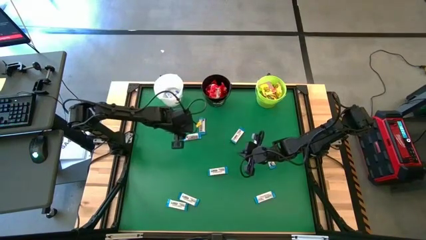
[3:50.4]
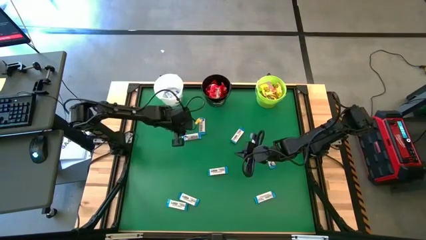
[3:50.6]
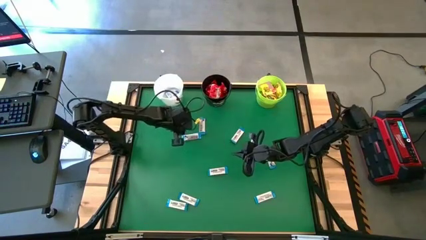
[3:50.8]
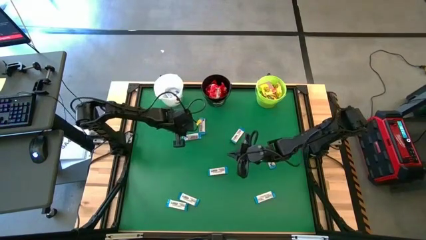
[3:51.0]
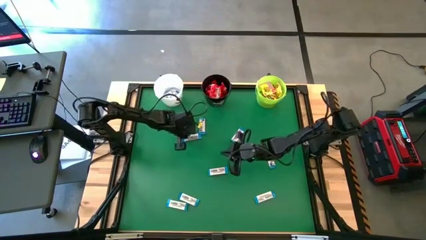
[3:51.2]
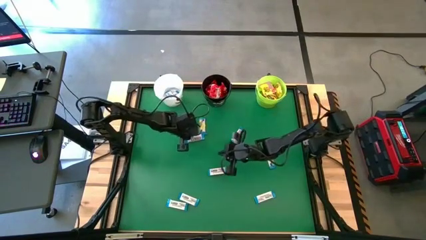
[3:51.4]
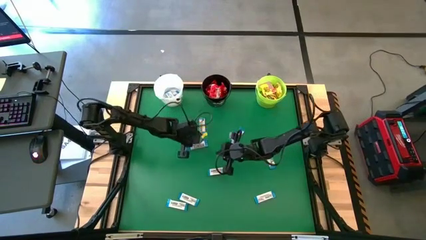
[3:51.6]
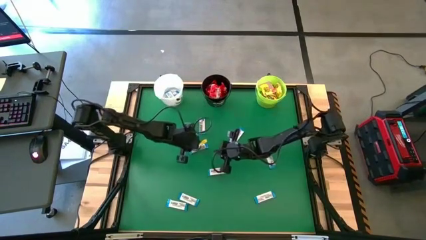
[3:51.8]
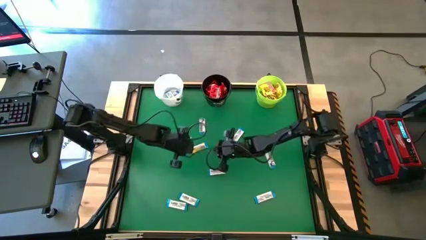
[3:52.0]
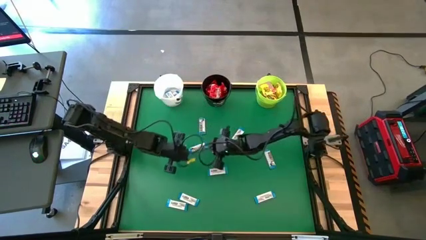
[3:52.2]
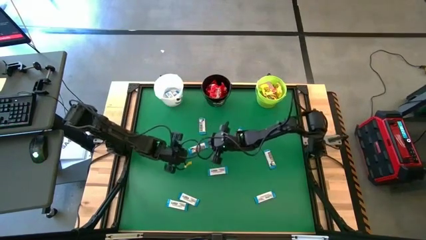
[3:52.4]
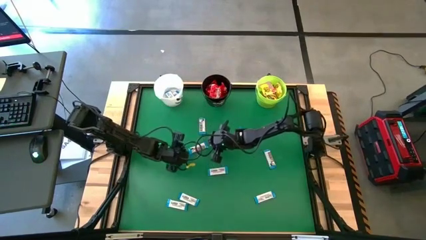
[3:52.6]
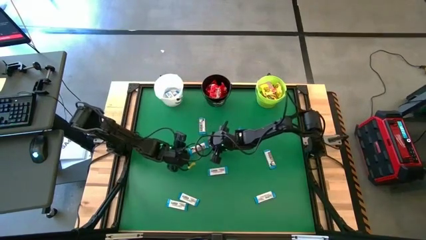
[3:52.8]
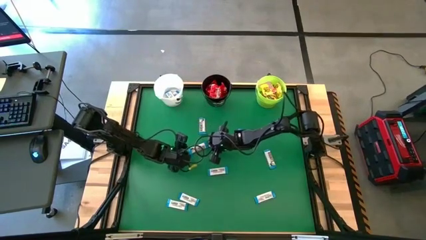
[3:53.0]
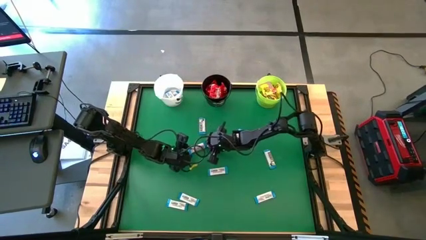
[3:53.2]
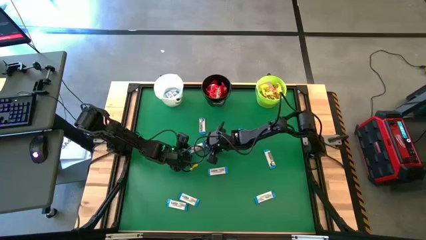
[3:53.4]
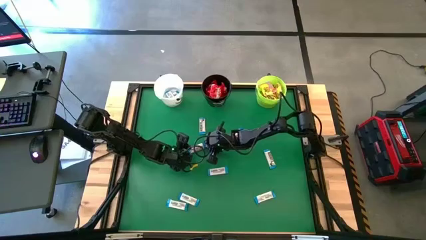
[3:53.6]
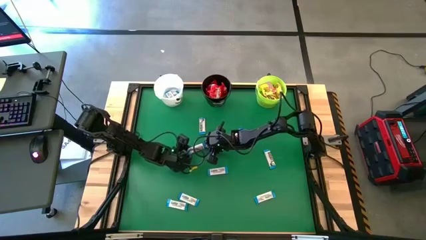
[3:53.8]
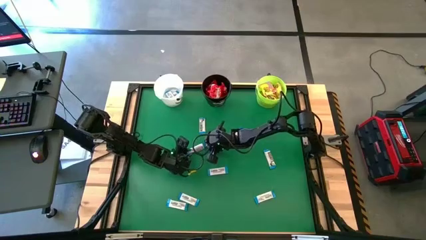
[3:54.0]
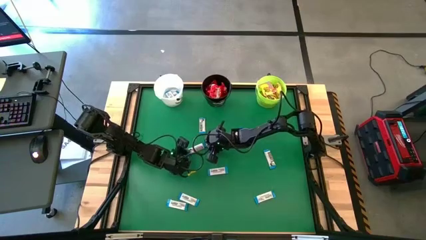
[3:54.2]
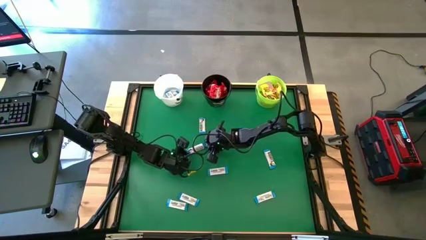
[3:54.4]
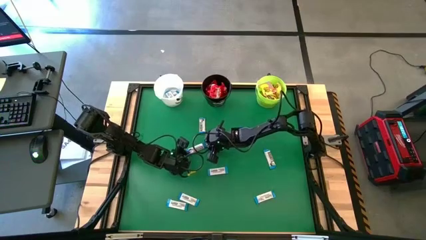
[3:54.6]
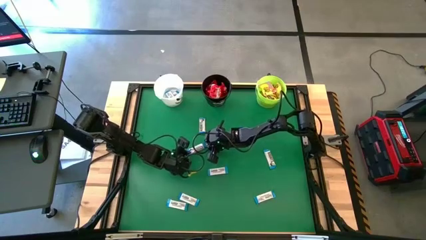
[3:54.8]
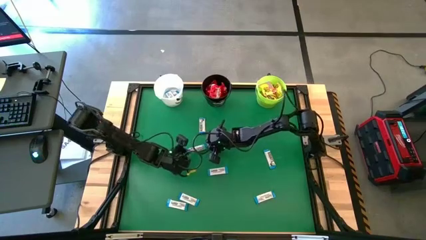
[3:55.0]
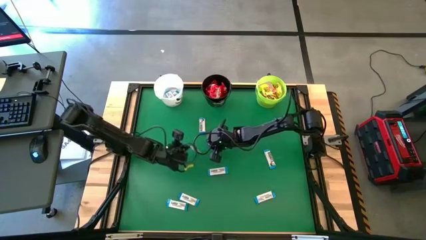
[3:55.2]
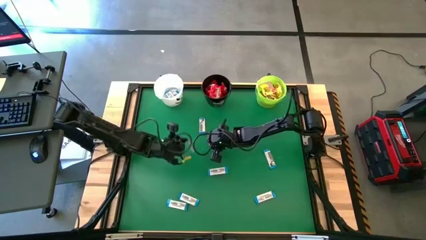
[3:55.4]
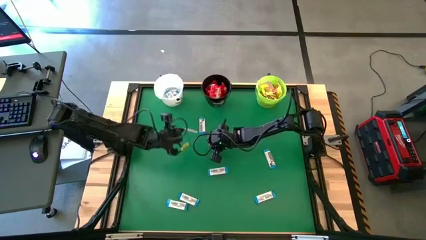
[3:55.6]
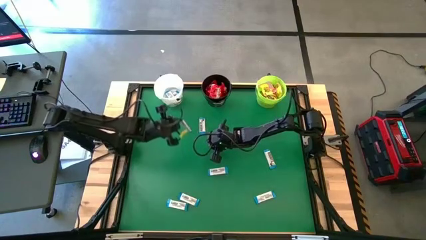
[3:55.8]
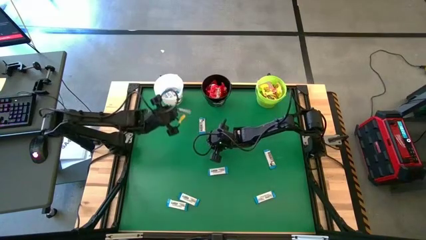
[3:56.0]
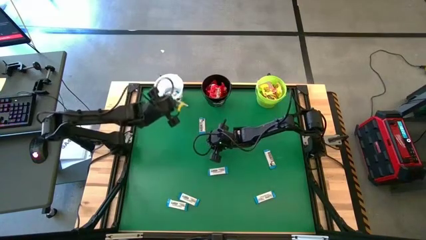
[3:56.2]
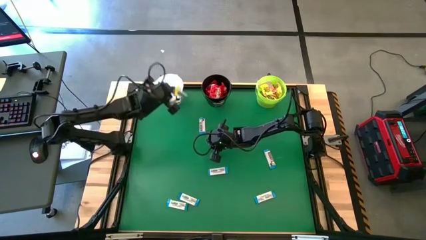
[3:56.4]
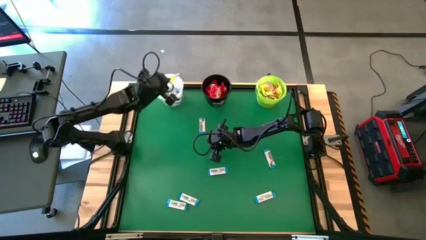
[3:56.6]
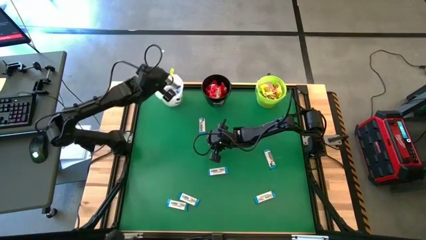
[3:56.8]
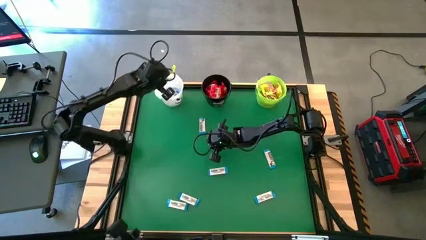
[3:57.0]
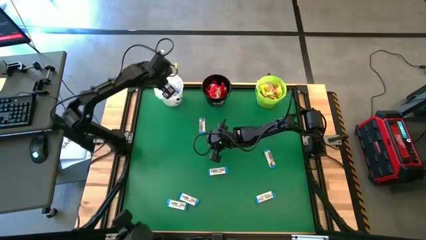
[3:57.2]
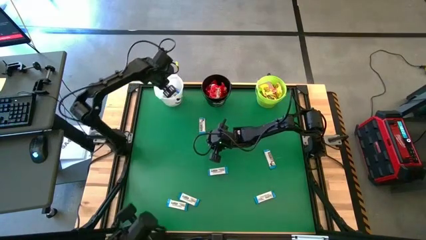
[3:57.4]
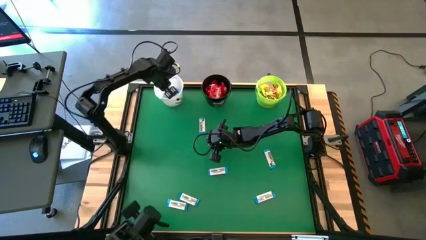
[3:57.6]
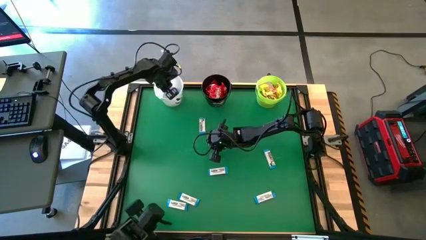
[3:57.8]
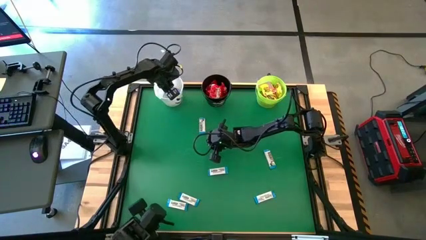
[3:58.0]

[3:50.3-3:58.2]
Task: Sort candy by brand, put in halloween buckets
Put the white chocolate bar into the white bucket

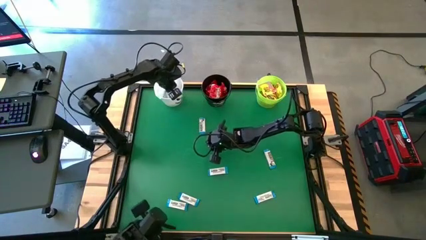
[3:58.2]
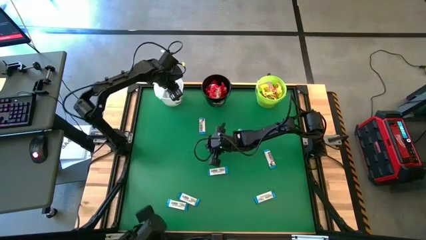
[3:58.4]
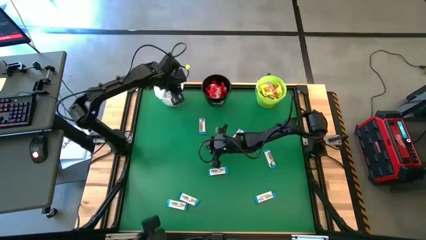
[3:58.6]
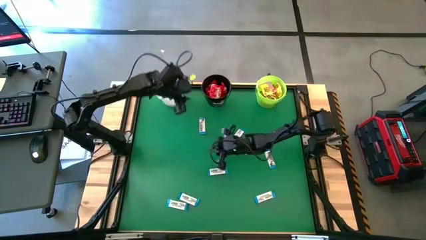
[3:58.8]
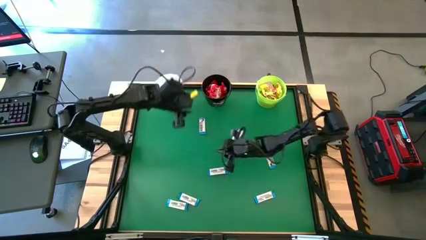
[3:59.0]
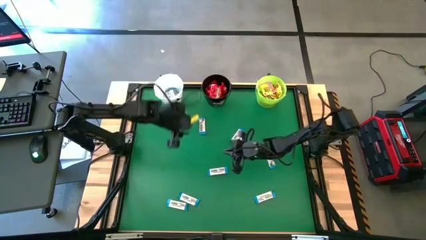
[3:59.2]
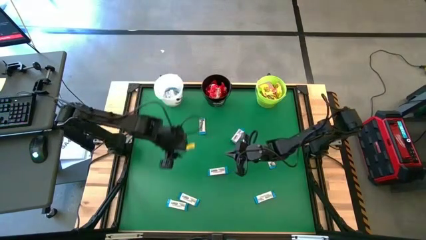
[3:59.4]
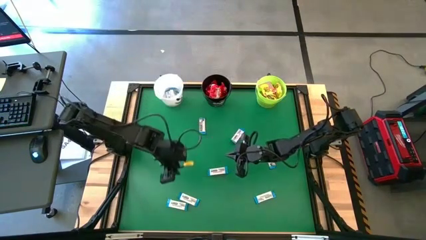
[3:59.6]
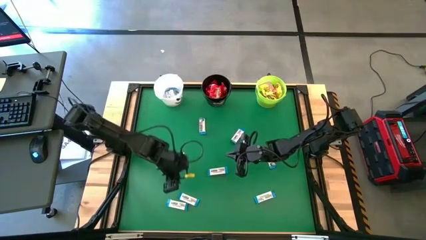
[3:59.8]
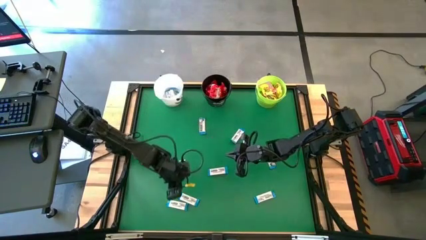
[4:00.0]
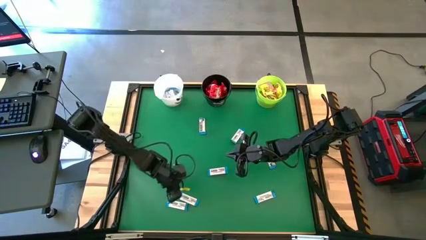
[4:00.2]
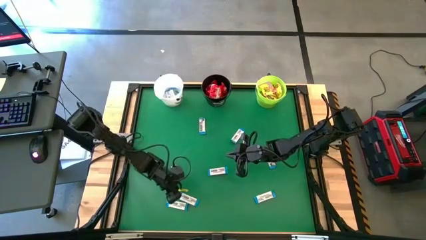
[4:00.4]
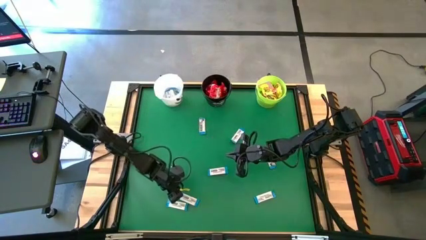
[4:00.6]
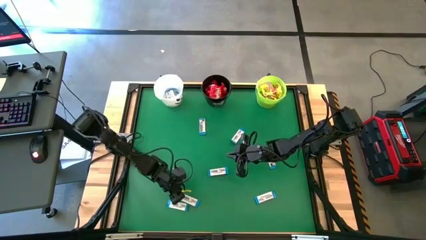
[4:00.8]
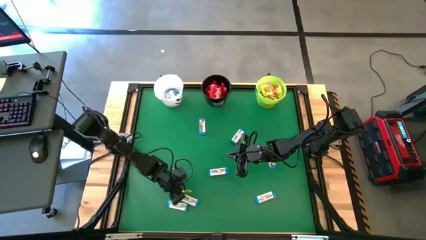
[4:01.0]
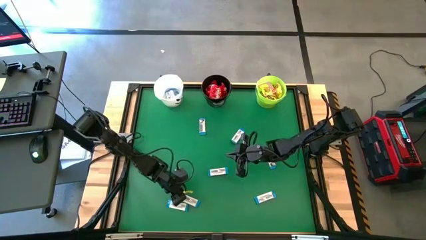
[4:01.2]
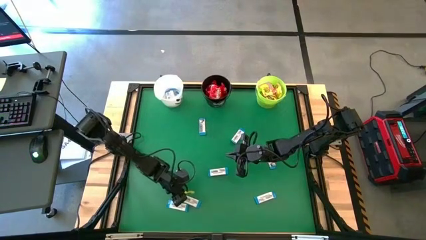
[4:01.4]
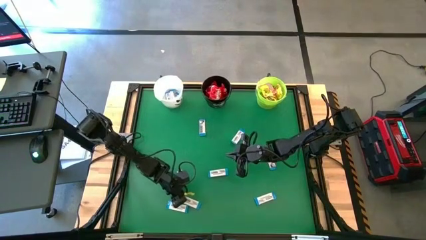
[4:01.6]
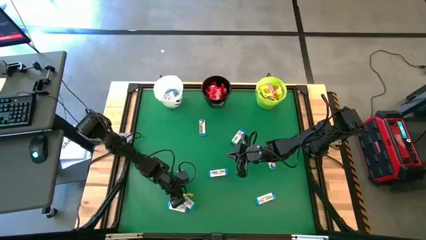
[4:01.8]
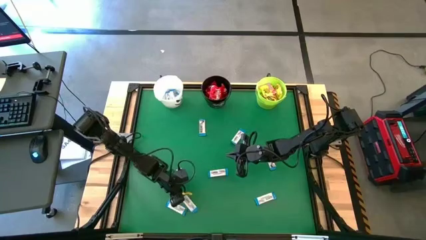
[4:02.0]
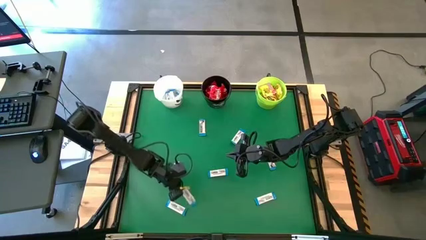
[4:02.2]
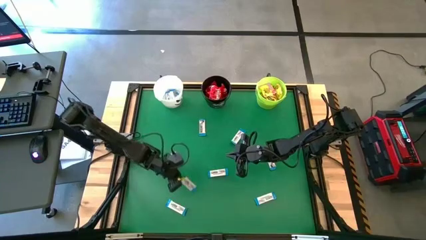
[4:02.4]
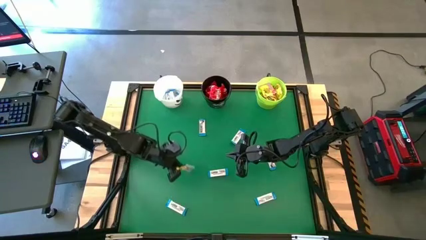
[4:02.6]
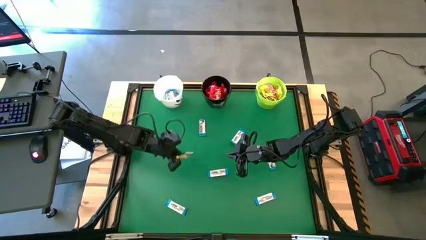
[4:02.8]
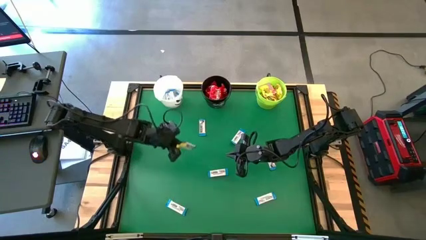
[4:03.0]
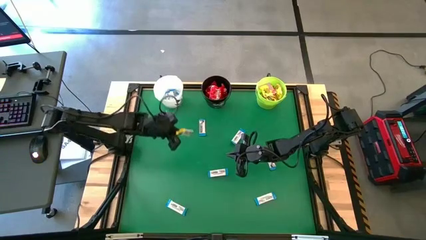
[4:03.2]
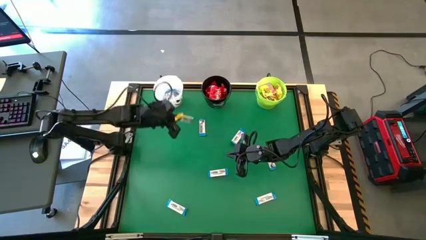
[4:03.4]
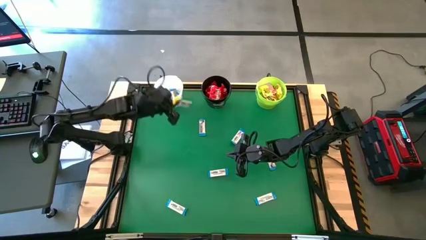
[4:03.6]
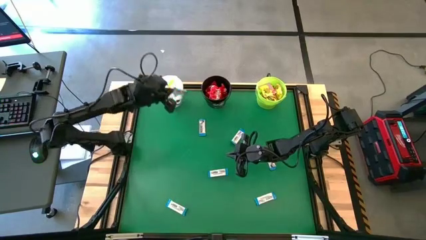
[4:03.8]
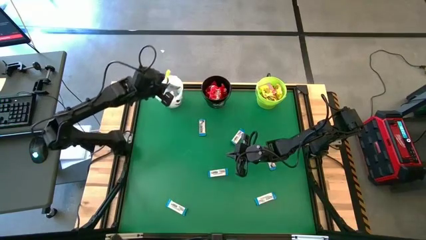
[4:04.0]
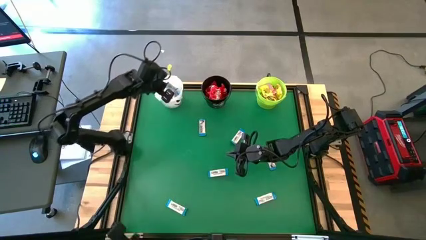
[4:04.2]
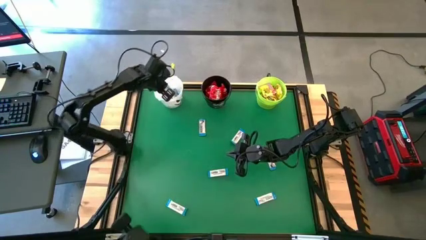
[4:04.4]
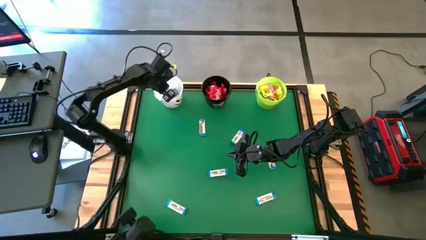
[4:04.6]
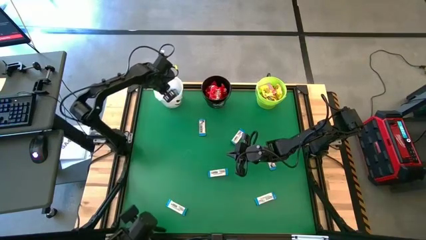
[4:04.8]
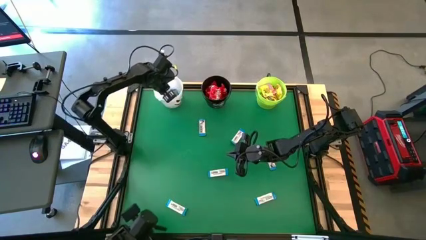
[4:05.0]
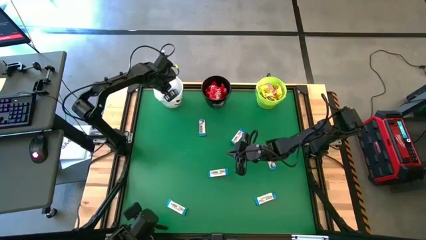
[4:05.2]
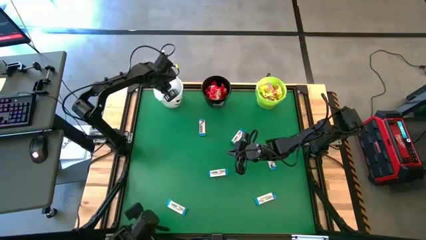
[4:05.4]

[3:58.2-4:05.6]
Put the white chocolate bar into the white bucket

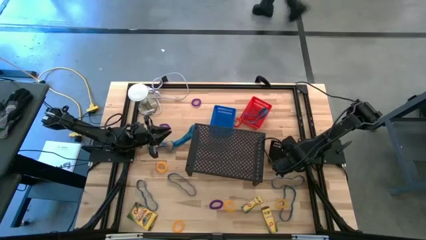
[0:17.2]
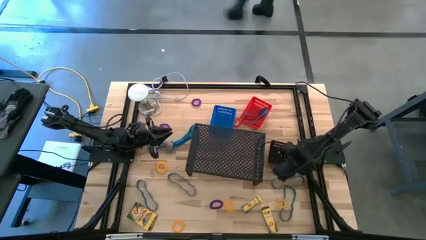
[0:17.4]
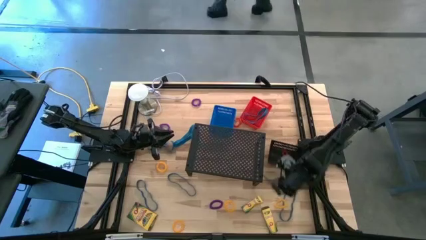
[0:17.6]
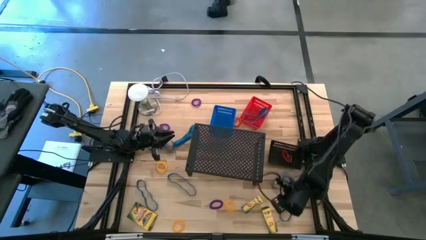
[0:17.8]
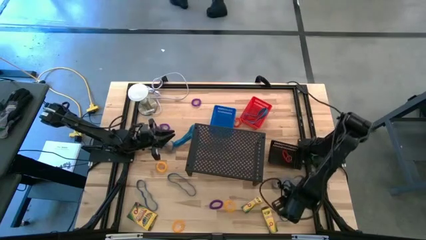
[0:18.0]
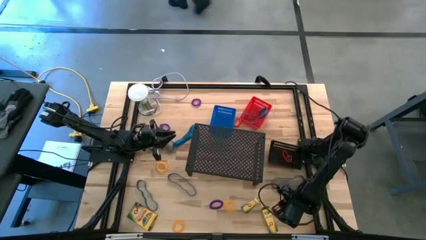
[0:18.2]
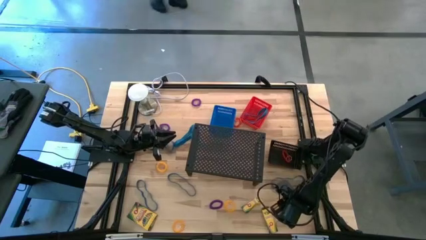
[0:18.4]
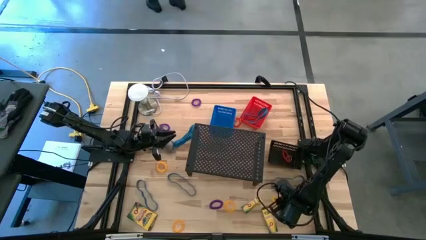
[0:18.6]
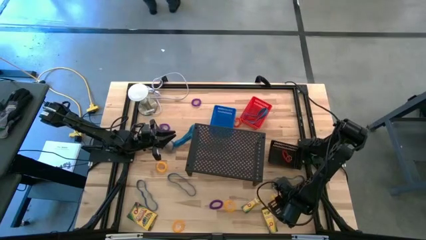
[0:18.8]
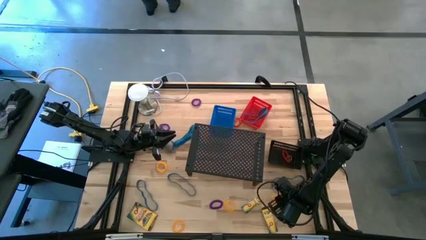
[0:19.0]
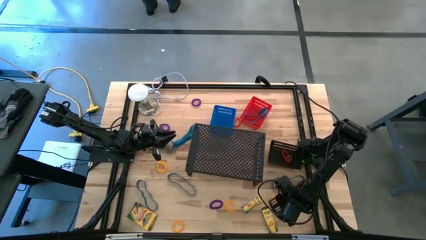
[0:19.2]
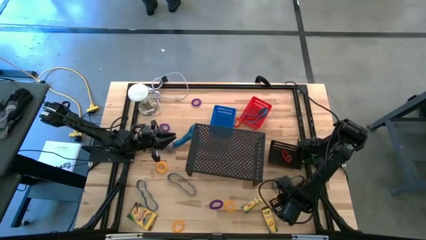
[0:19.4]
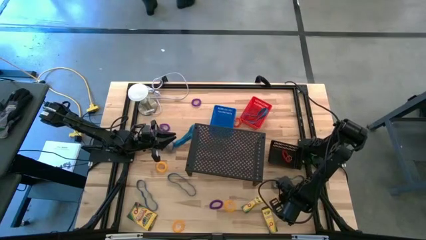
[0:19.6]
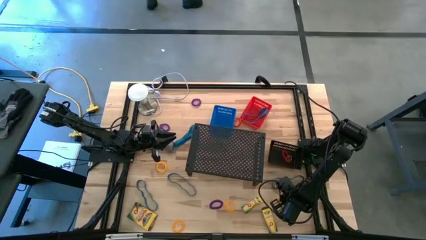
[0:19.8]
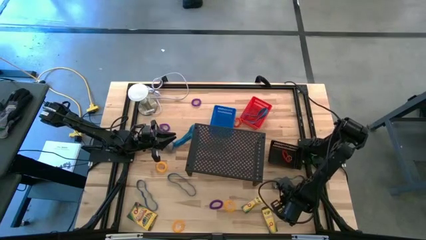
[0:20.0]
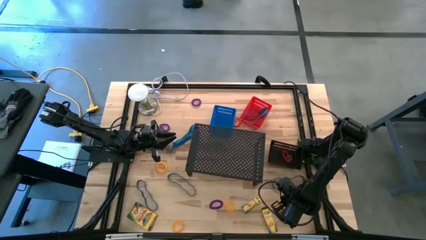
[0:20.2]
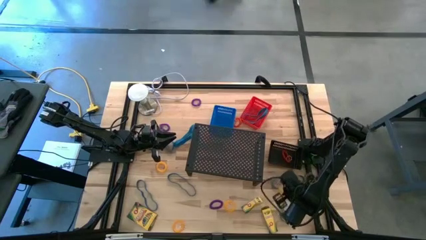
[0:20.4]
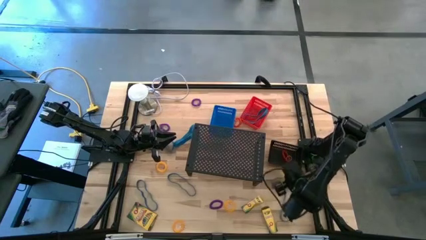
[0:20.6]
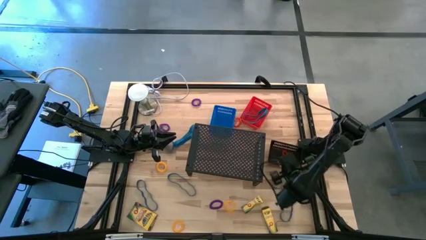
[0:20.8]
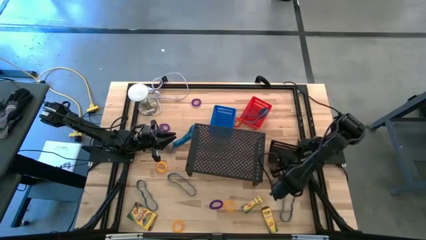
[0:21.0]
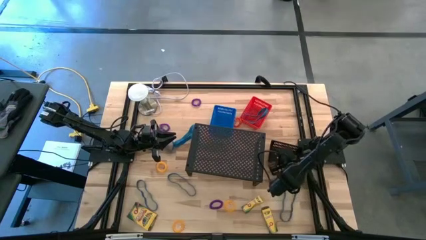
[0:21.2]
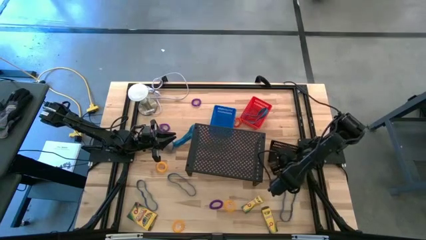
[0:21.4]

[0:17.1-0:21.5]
Task: Pick & Place Office Desk Supplies
Put the yellow spiral keychain into the black bin
